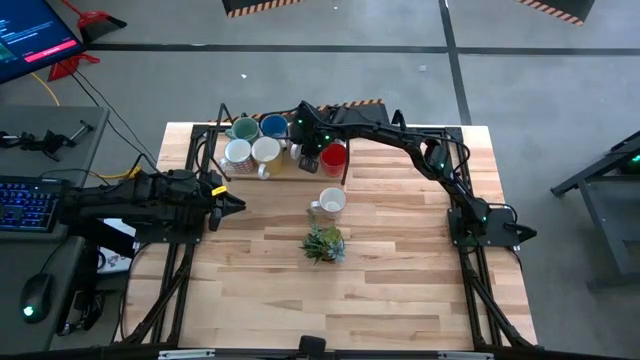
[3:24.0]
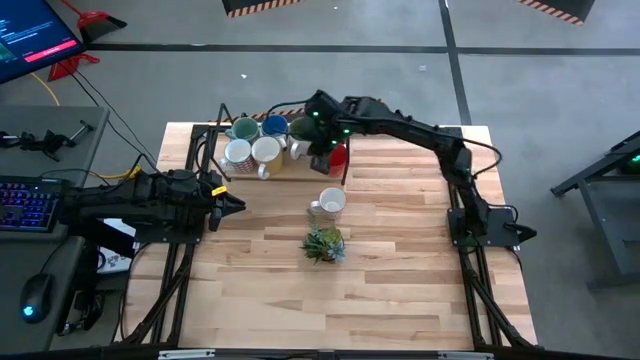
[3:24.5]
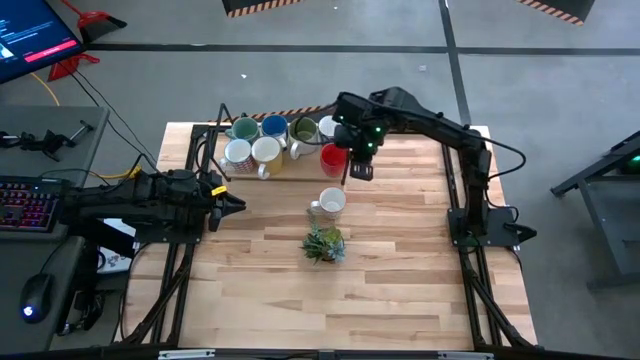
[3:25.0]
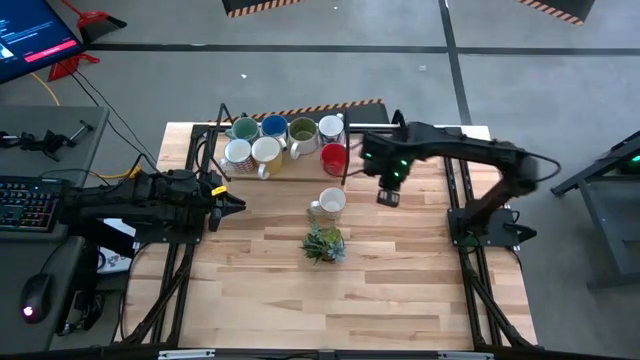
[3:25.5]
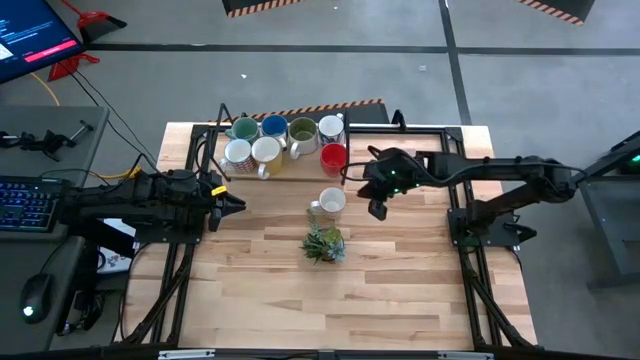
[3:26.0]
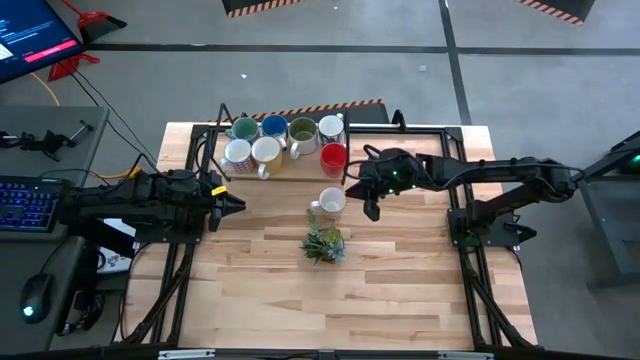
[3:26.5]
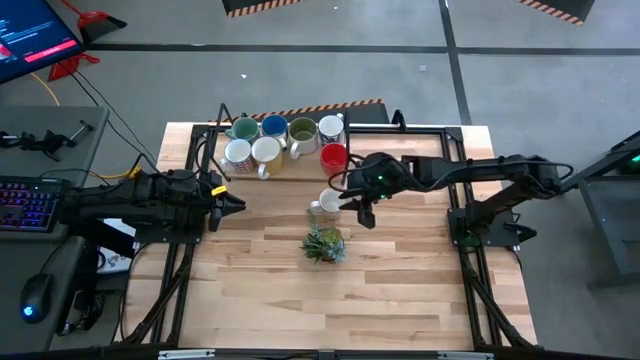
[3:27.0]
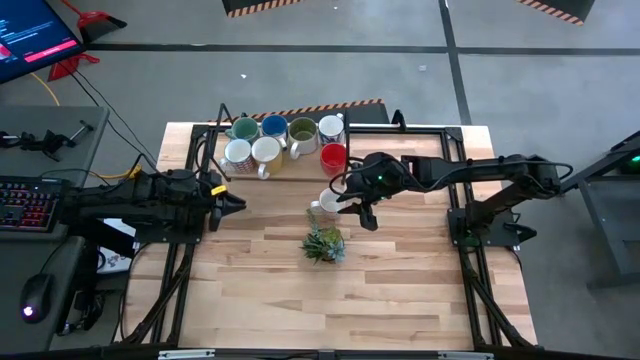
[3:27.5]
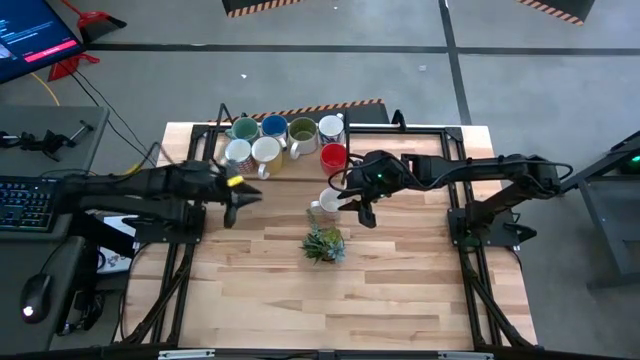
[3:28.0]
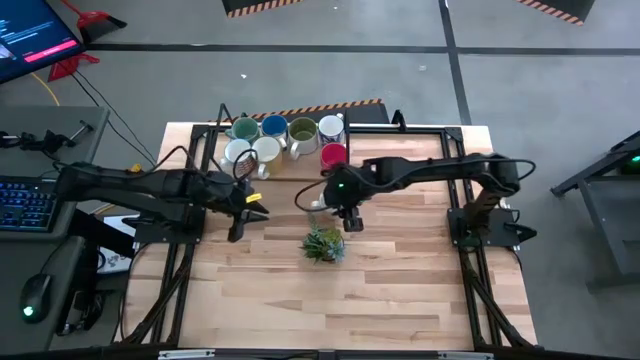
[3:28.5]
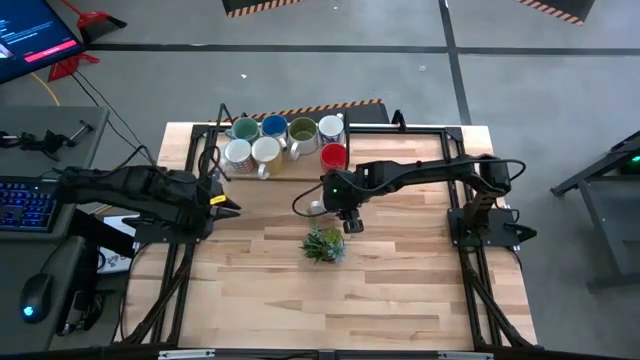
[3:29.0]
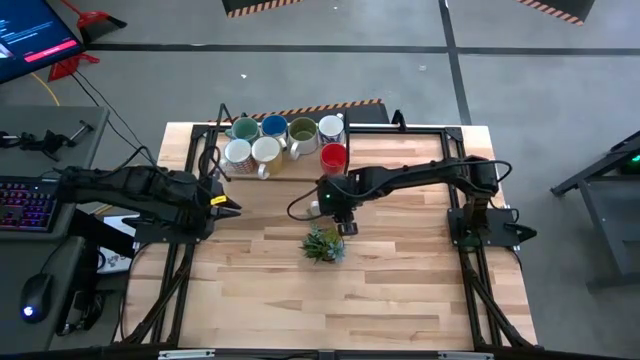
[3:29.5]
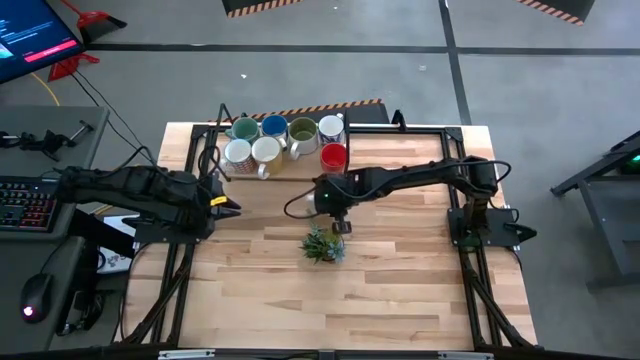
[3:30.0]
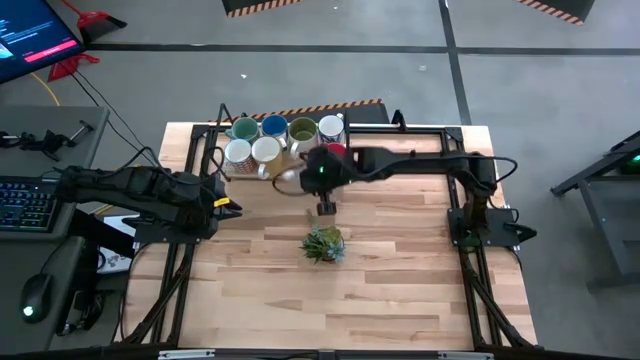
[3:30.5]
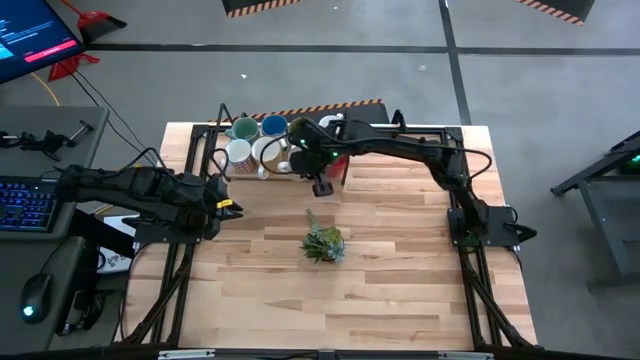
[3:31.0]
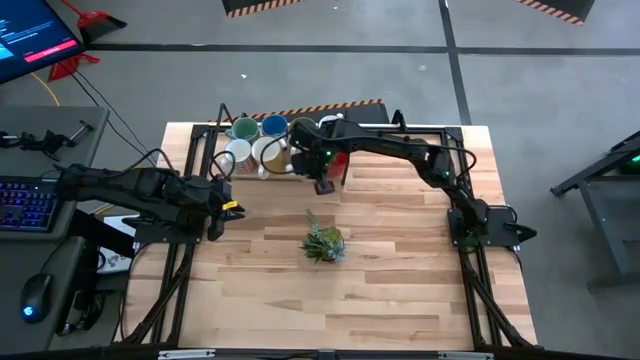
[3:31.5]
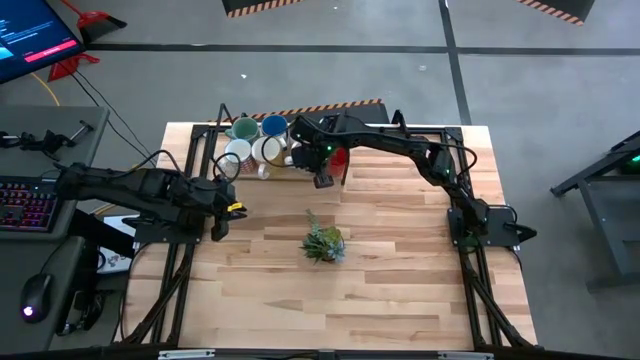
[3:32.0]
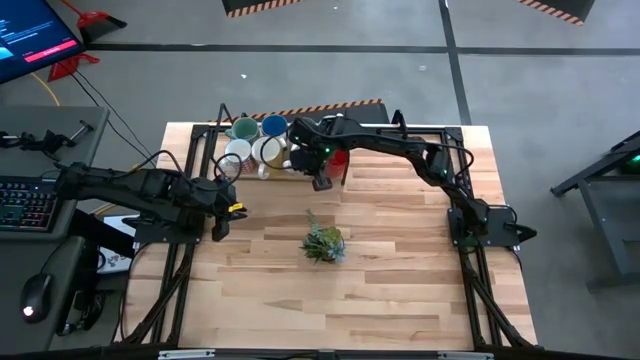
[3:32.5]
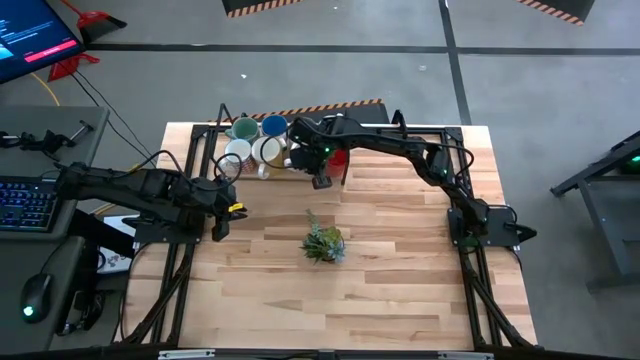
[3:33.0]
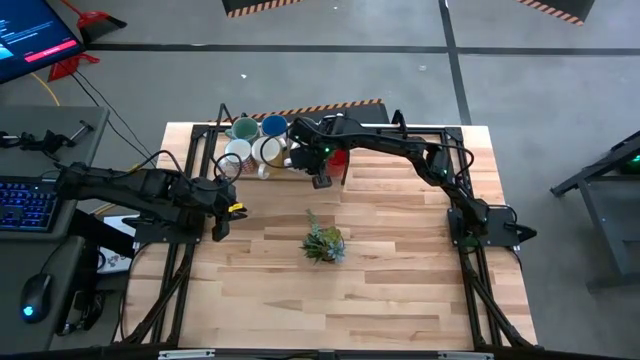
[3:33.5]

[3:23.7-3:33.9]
Task: Place coffee mugs
Put the gray patterned mug on the shelf

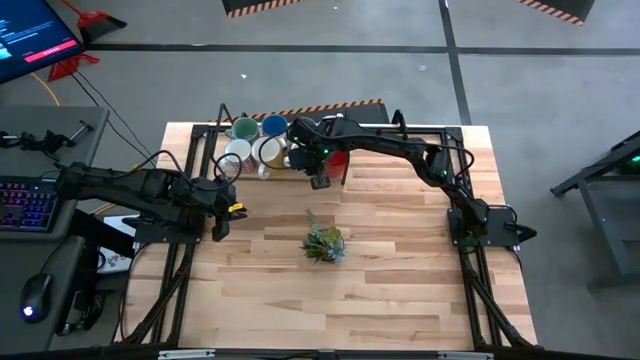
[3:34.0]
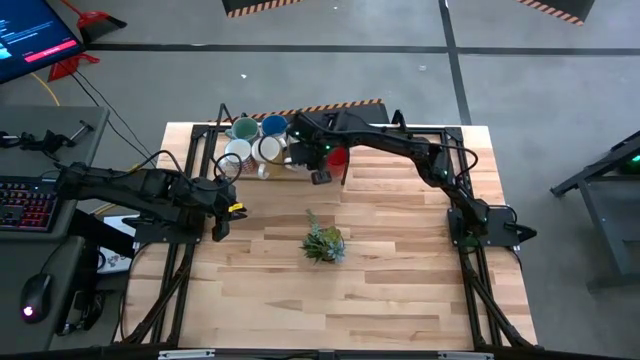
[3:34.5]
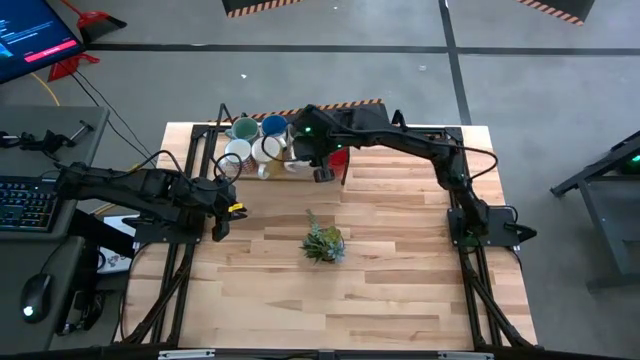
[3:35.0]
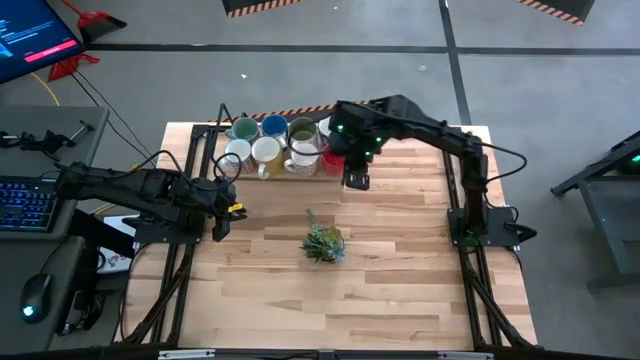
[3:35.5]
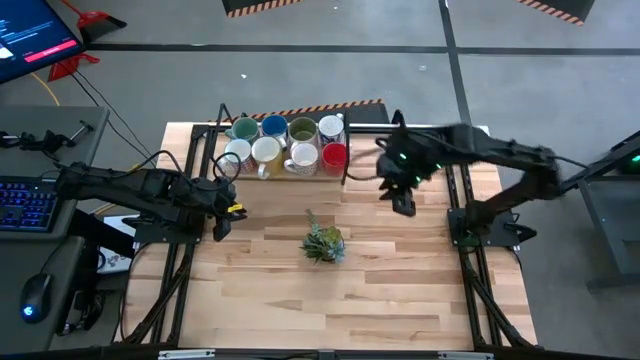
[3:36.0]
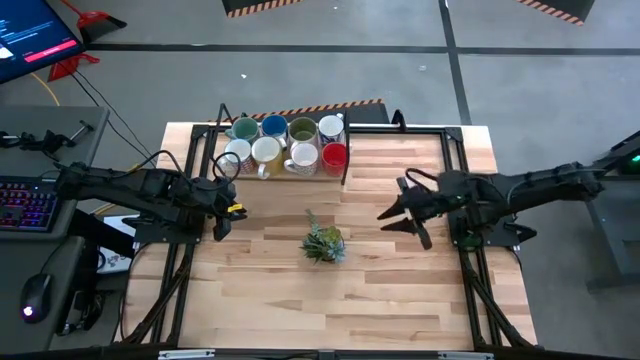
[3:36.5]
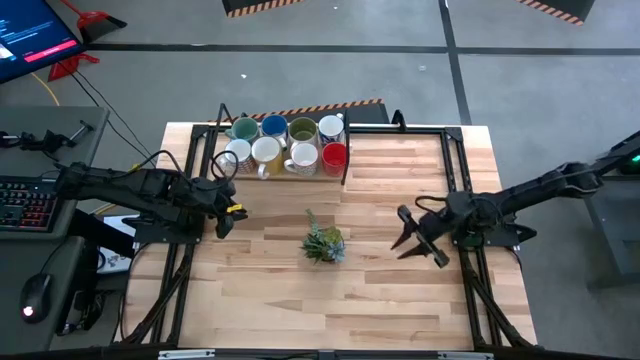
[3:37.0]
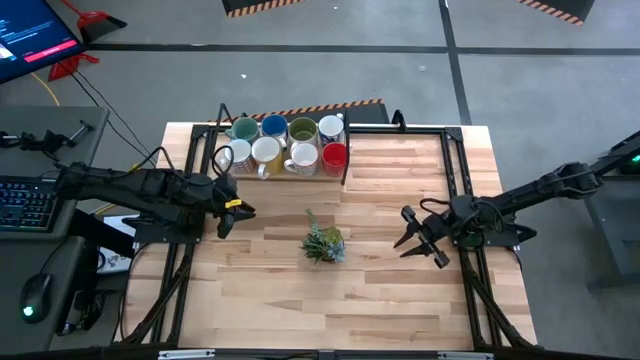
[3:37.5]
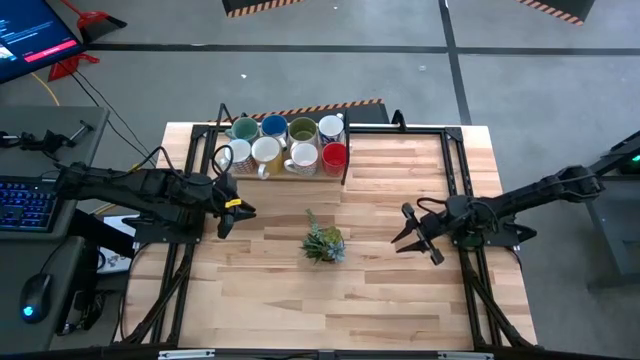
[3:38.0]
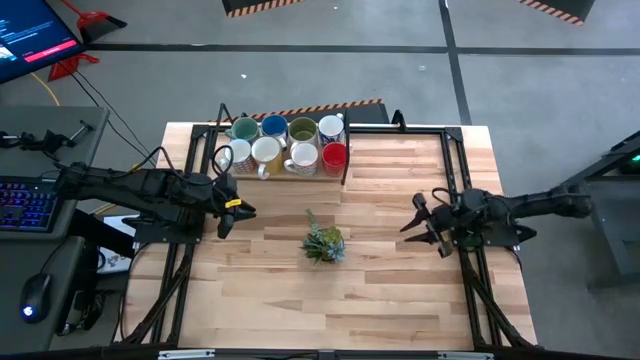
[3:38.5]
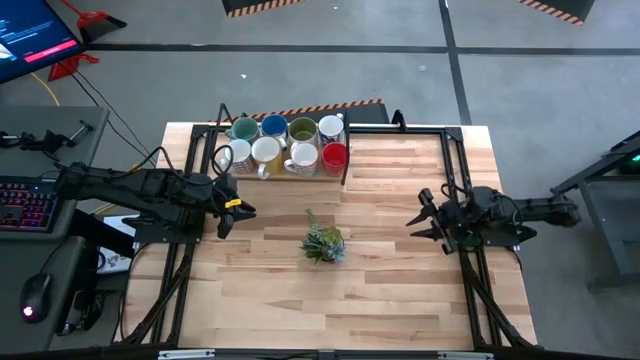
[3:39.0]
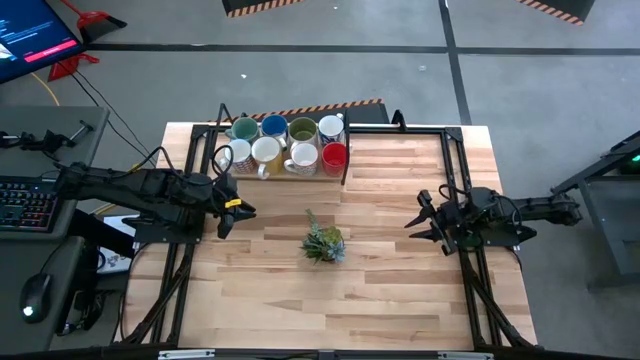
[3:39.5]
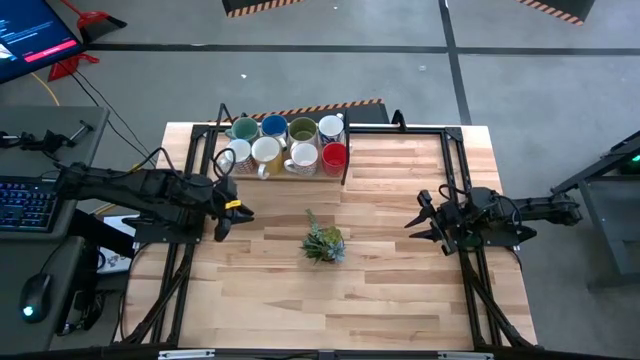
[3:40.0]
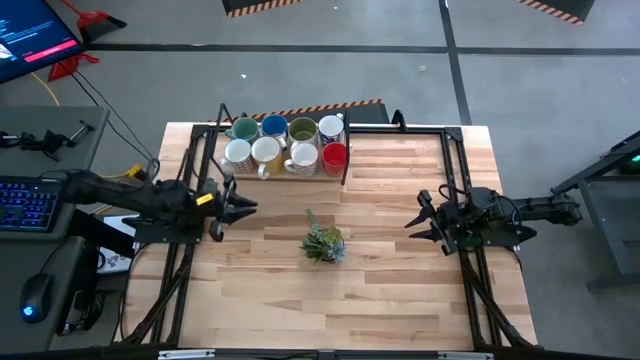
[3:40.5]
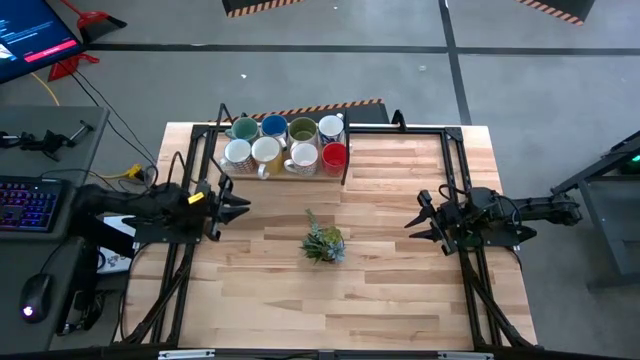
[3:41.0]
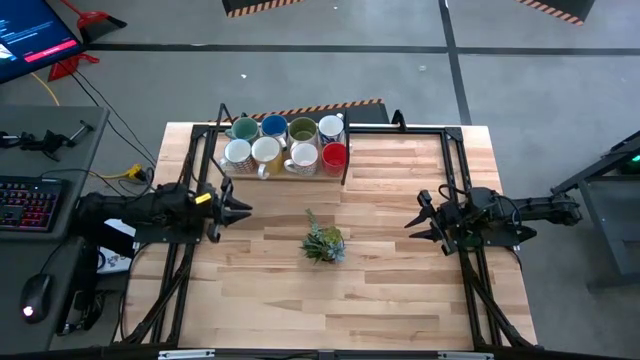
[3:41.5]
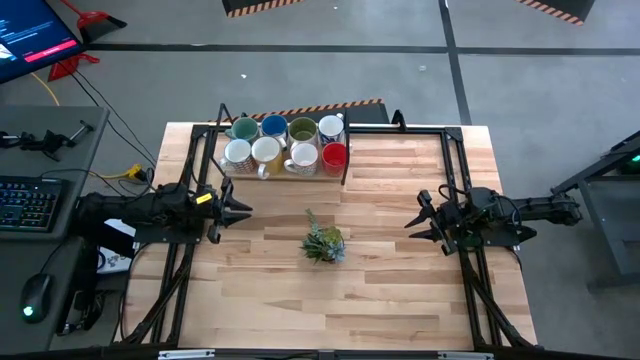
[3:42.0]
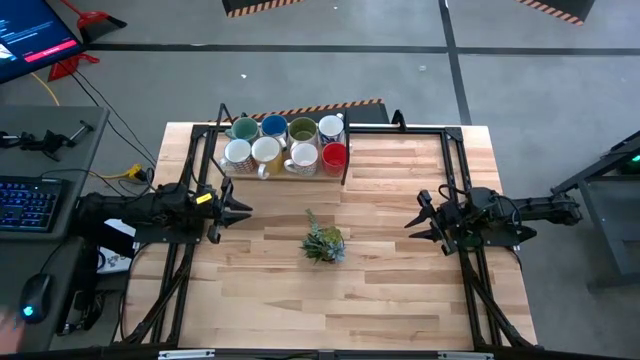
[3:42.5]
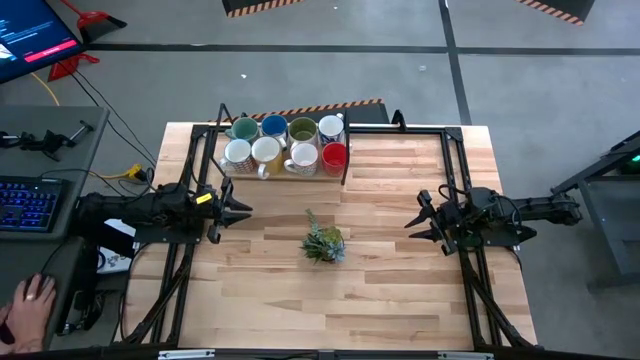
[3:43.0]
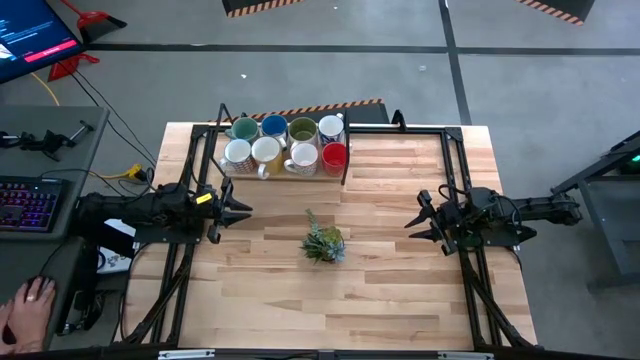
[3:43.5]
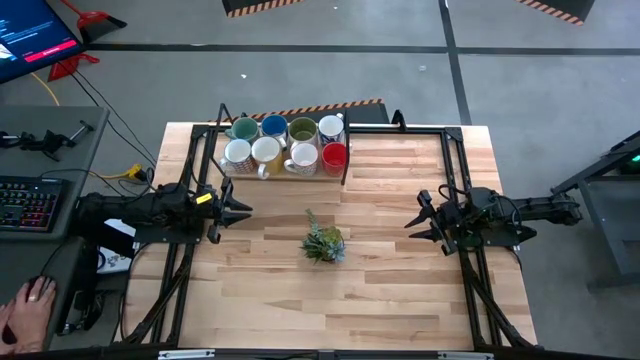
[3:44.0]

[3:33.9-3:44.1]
Return to Home Position

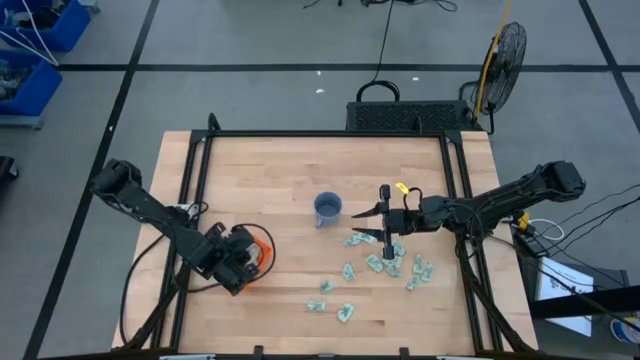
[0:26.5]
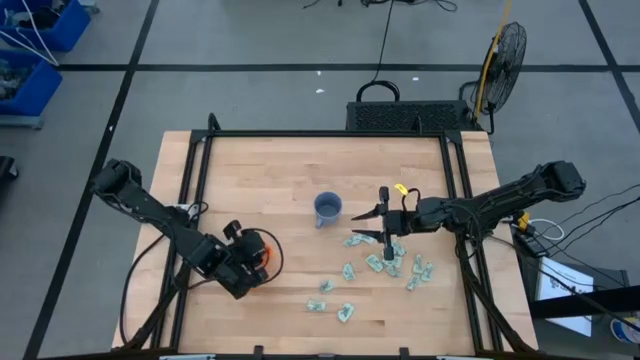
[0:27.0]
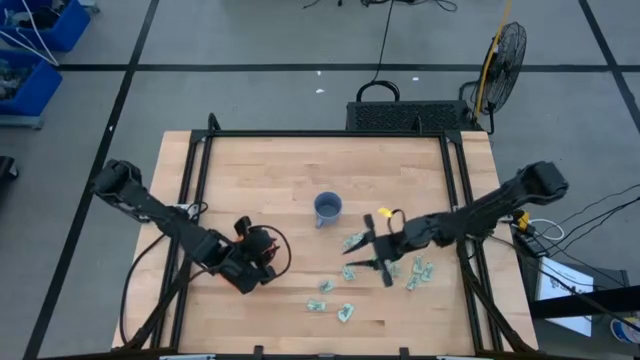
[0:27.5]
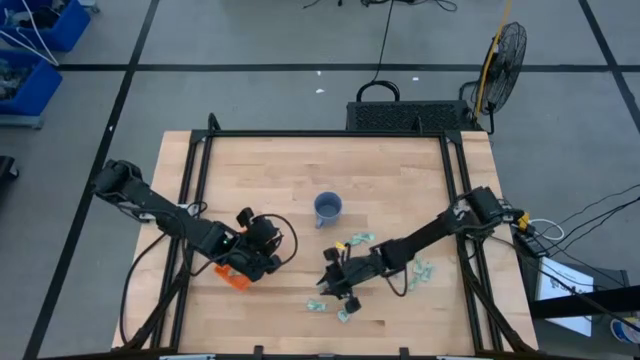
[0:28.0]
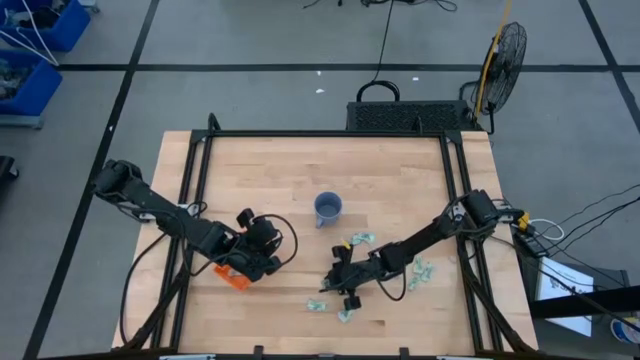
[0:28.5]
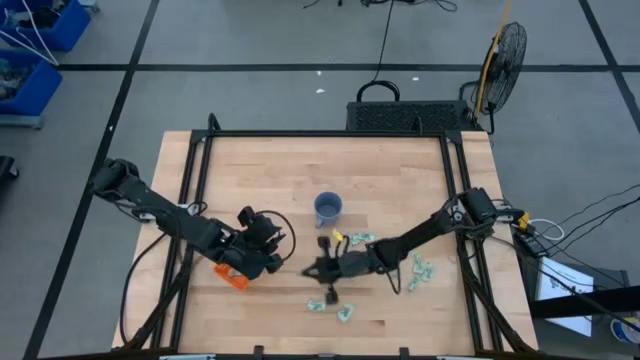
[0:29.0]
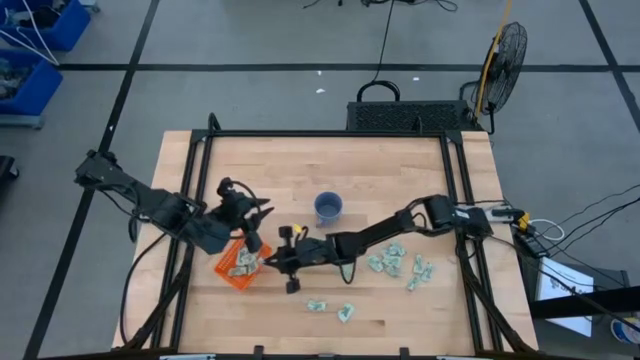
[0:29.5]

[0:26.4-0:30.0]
Task: Pick and place Stevia / Truvia into bins
Put the green stevia packet into the orange basket
